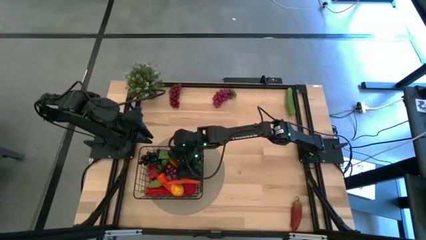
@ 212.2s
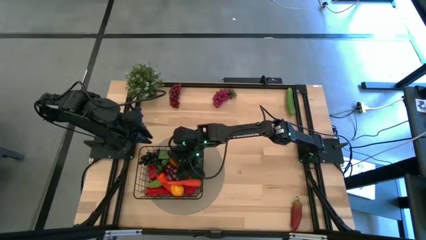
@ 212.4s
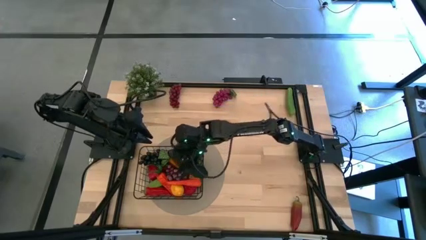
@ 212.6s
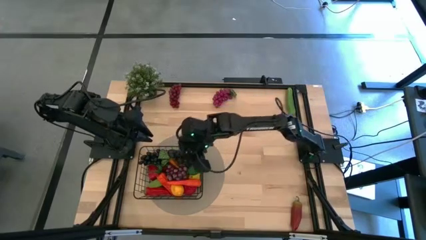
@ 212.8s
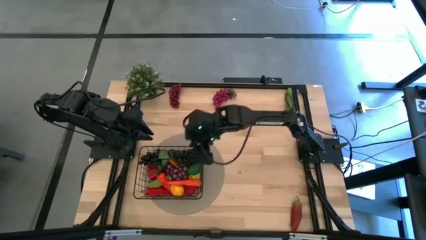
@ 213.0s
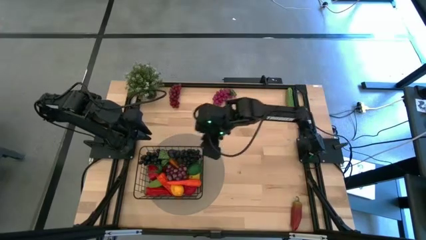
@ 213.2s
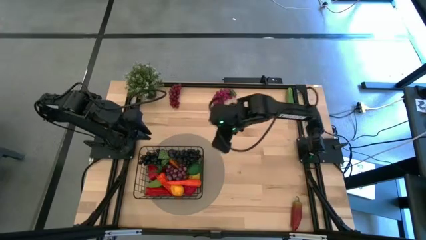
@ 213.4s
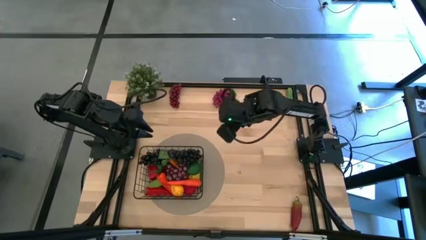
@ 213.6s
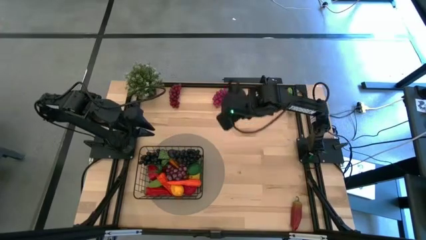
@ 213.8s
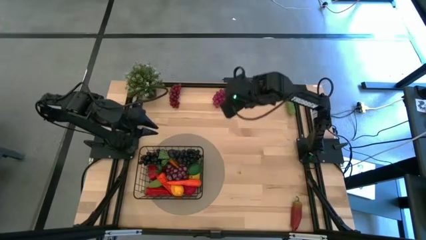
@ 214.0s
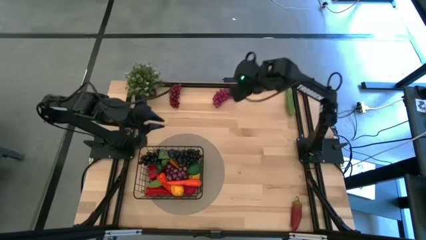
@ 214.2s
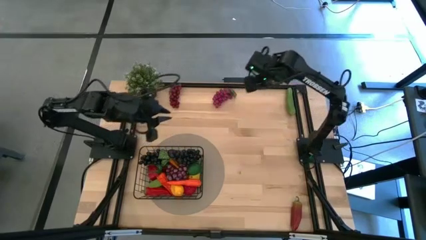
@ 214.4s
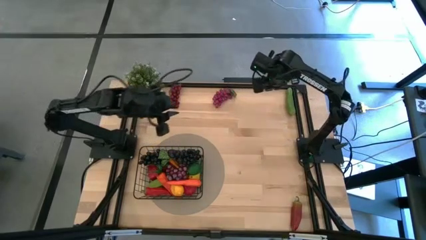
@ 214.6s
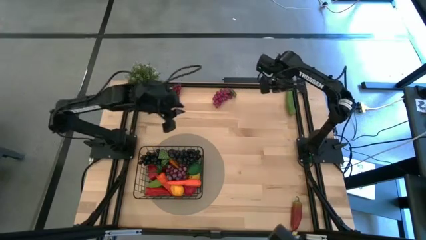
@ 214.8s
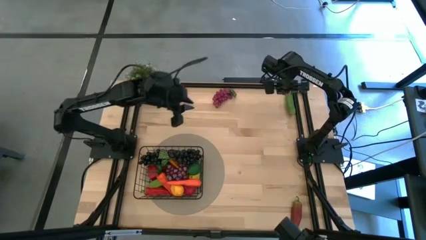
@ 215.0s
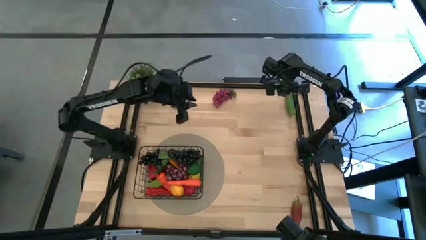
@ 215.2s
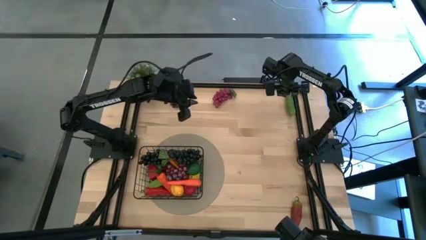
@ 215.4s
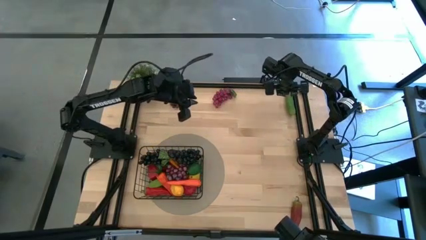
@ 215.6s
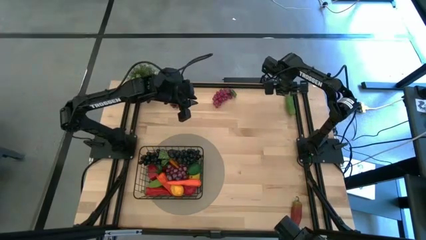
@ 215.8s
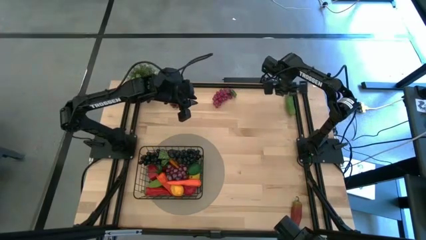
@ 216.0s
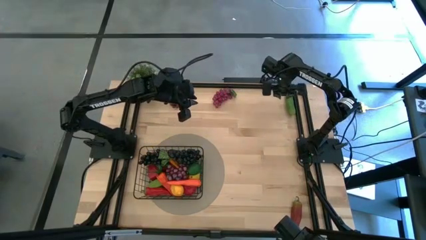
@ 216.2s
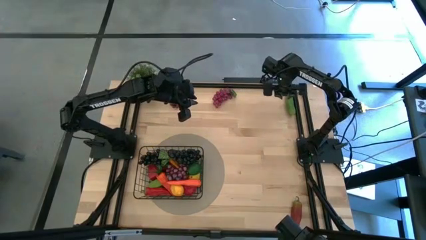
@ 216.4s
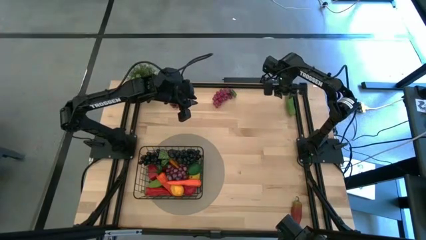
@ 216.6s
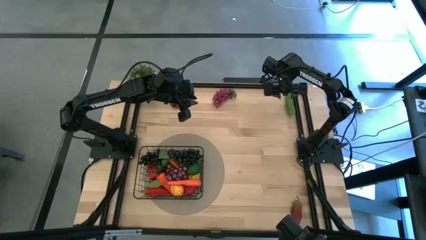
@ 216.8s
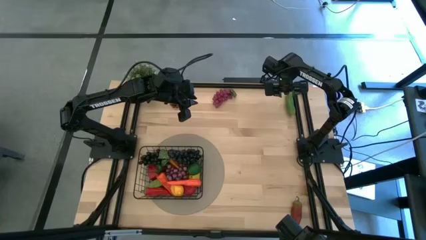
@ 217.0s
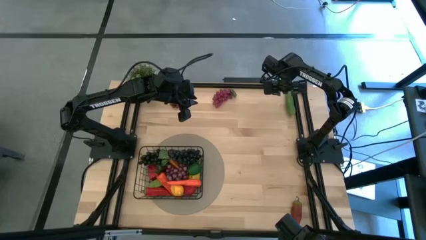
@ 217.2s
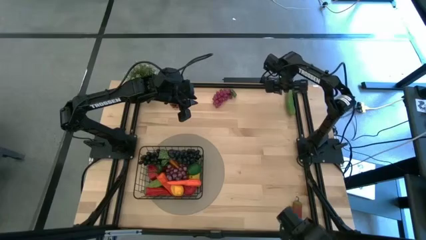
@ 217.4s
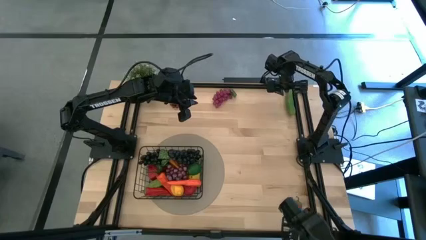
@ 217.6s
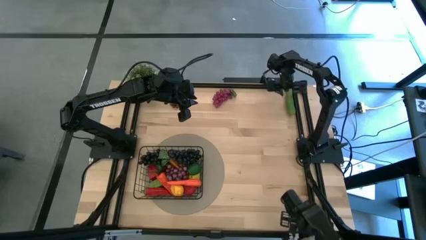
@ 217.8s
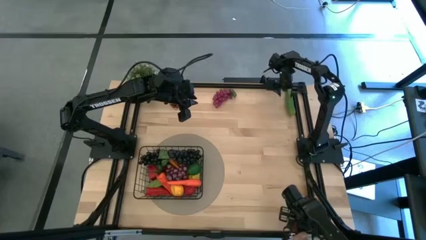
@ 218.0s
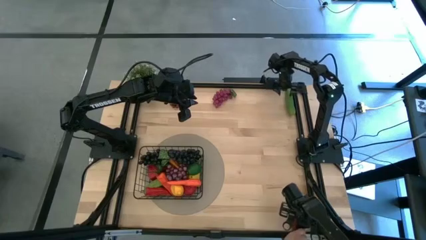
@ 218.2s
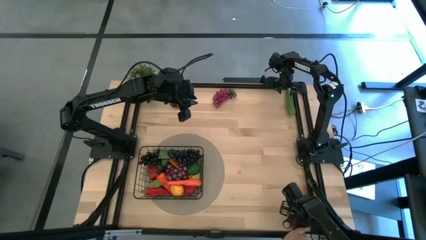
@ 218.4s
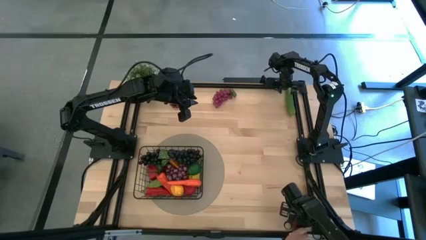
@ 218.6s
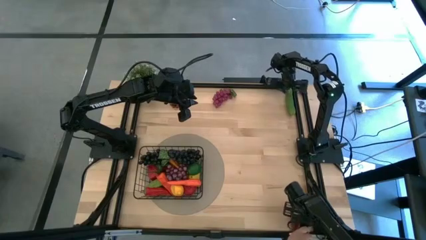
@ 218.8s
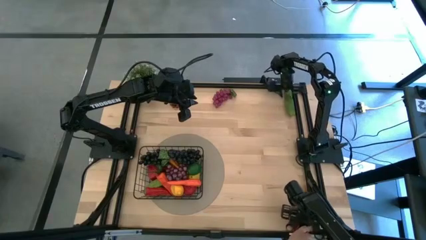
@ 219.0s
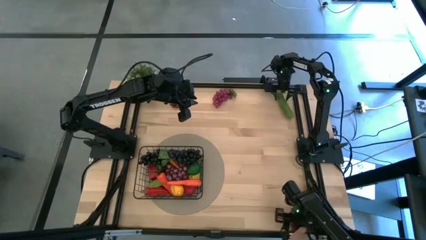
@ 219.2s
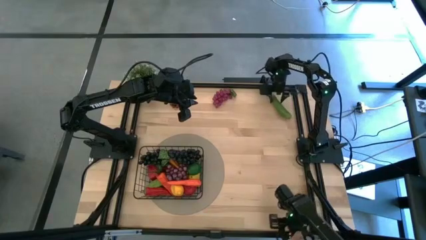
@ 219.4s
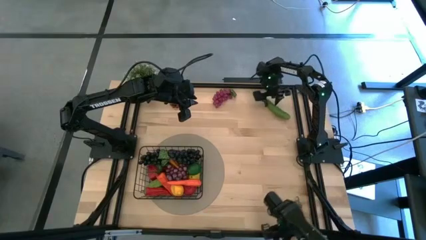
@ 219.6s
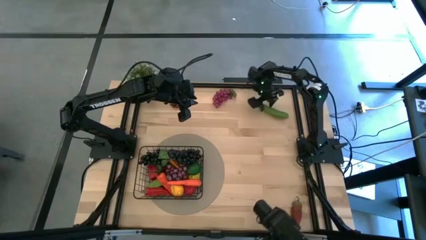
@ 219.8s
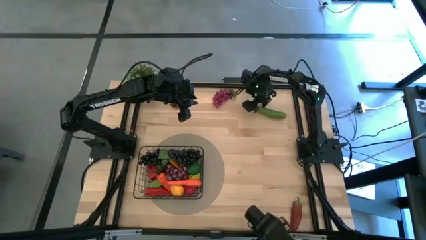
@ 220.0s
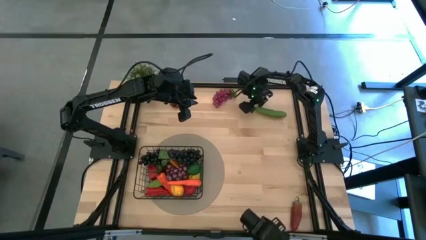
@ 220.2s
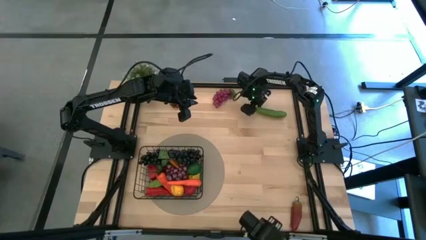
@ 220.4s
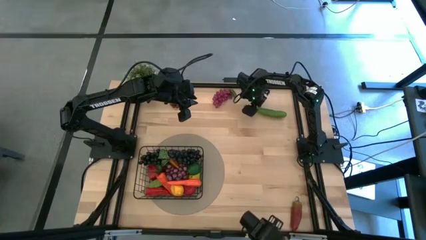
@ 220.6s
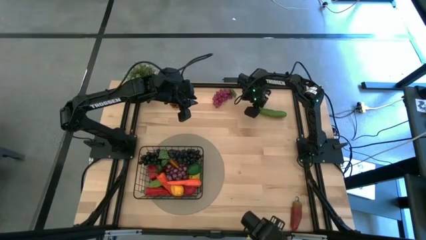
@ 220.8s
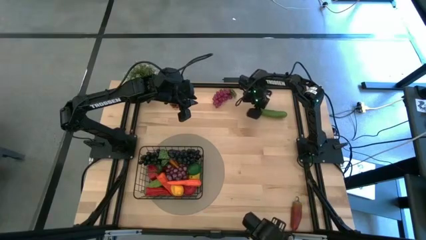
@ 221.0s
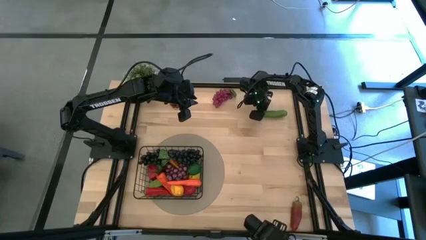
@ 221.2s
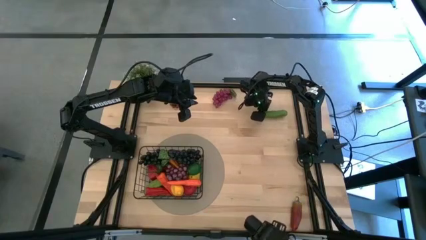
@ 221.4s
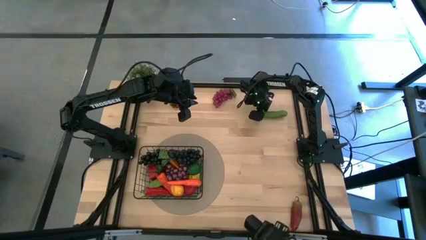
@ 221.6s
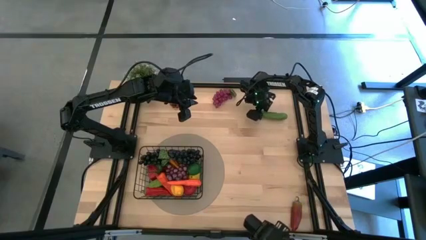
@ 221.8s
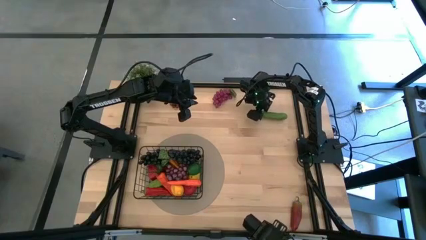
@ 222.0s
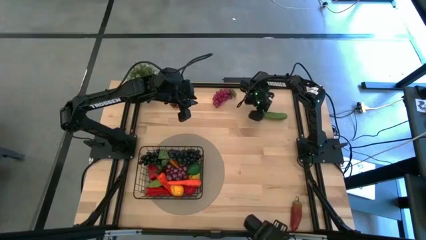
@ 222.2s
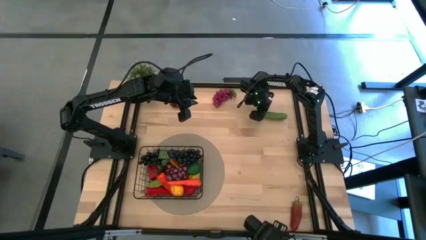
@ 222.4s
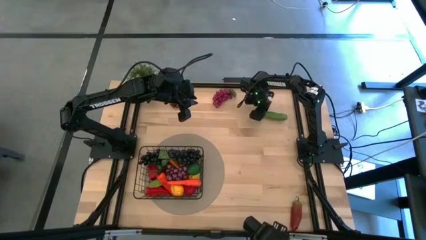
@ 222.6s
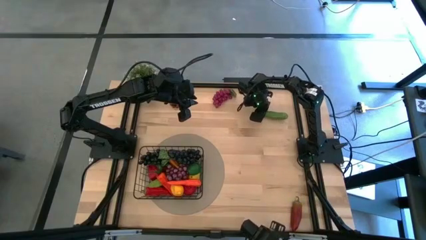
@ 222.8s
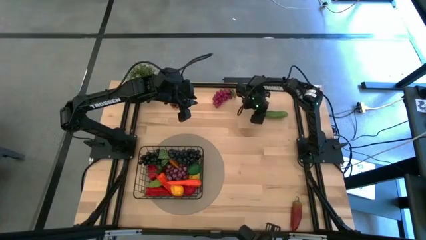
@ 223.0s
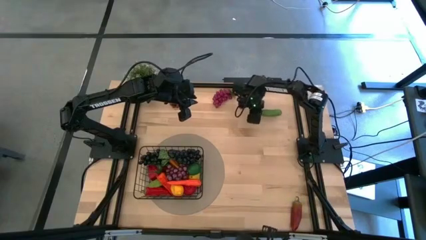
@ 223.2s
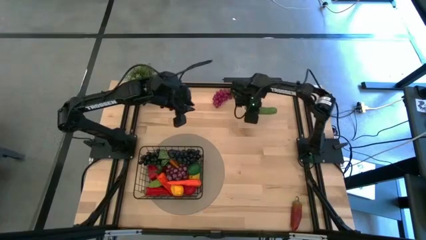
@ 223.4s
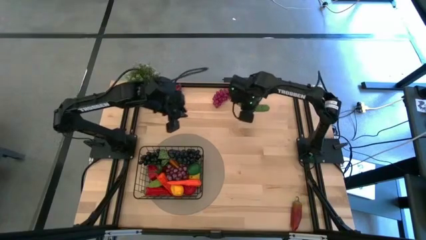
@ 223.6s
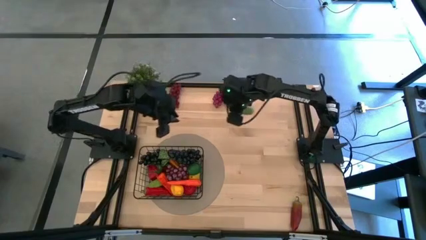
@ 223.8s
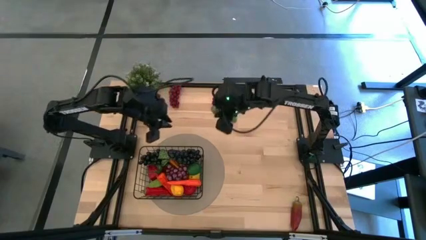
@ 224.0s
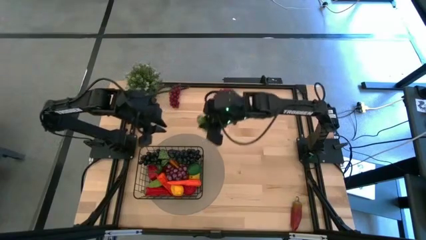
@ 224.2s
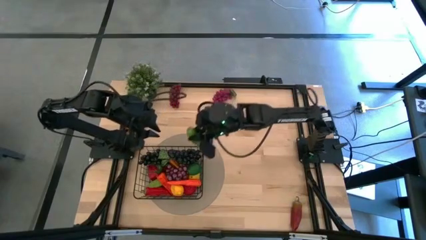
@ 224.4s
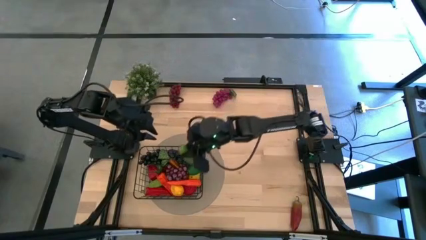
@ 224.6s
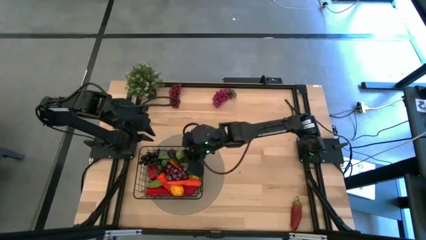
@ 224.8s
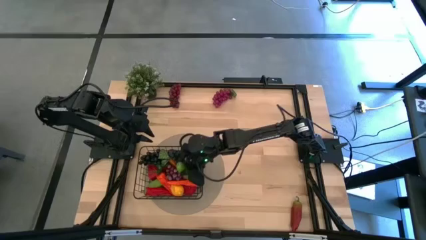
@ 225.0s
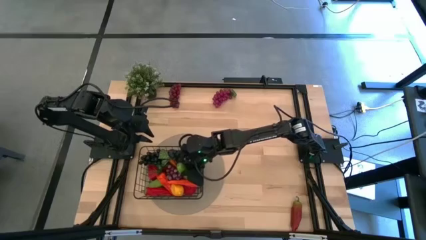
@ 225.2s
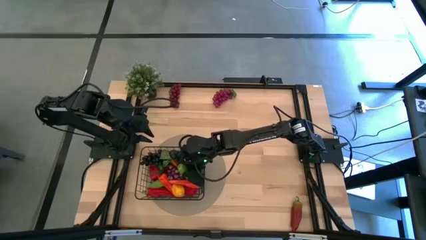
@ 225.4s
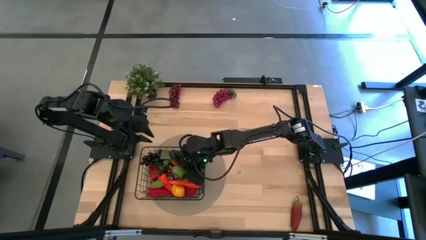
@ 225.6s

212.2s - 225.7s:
Task: Build produce basket
Put the green cucumber into the black wire basket
